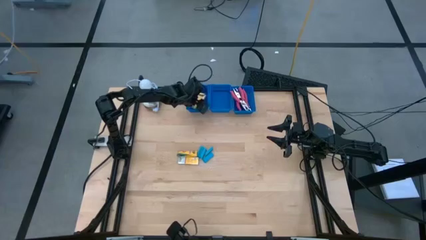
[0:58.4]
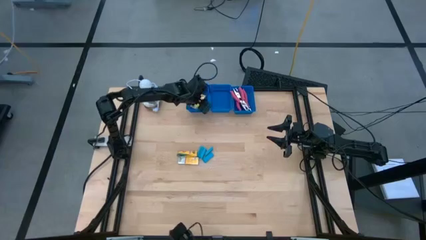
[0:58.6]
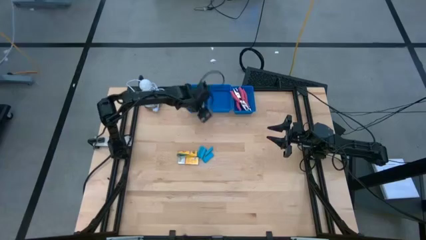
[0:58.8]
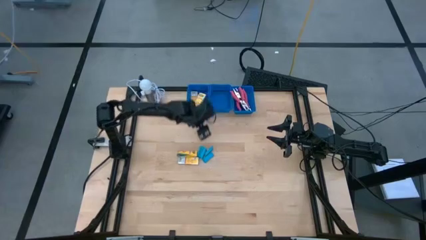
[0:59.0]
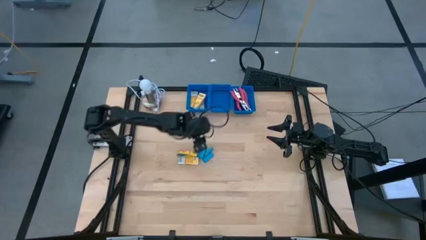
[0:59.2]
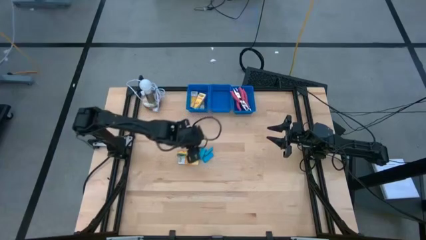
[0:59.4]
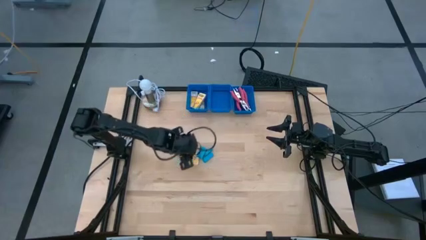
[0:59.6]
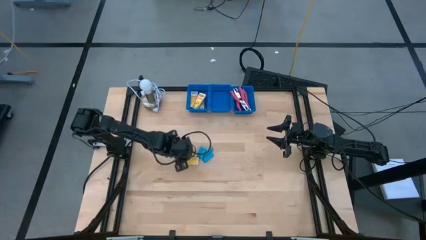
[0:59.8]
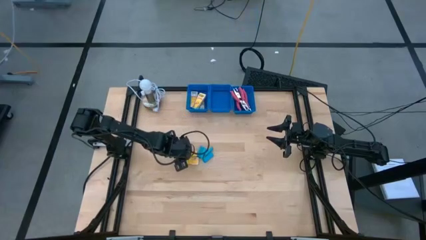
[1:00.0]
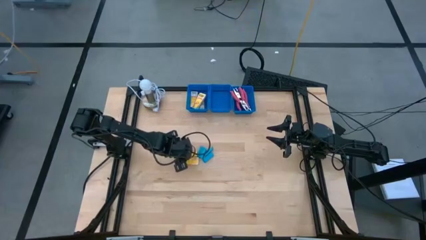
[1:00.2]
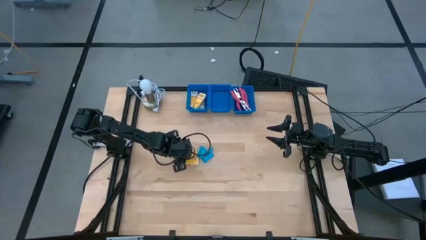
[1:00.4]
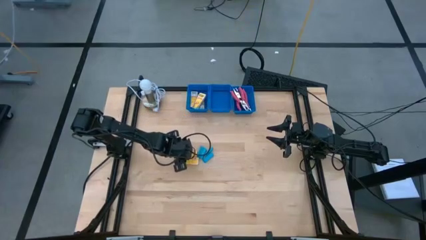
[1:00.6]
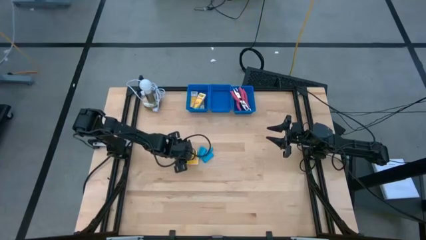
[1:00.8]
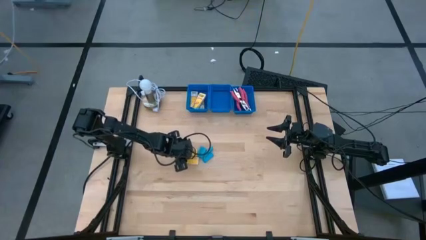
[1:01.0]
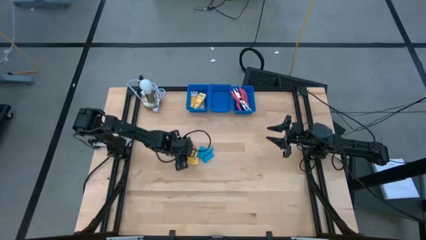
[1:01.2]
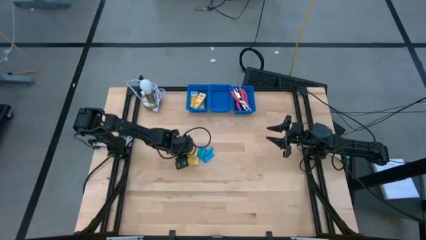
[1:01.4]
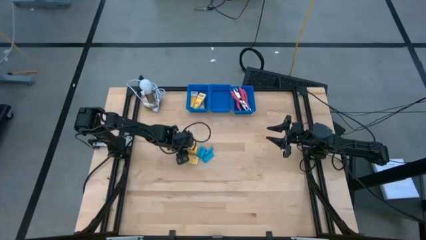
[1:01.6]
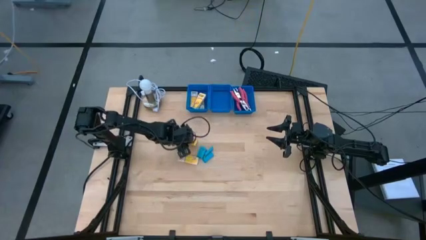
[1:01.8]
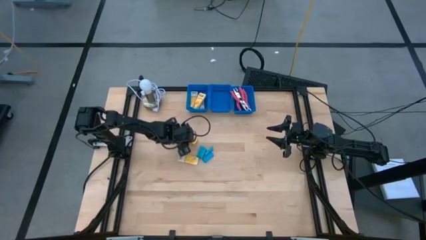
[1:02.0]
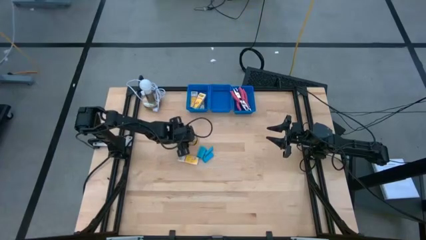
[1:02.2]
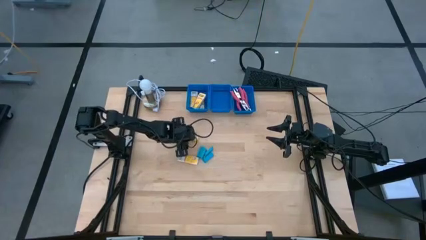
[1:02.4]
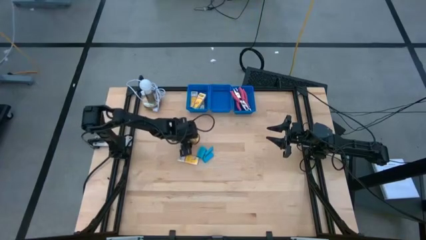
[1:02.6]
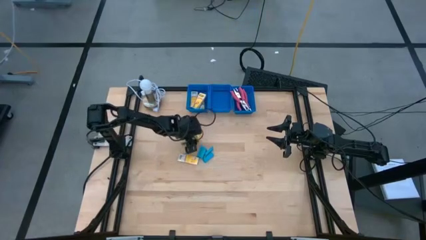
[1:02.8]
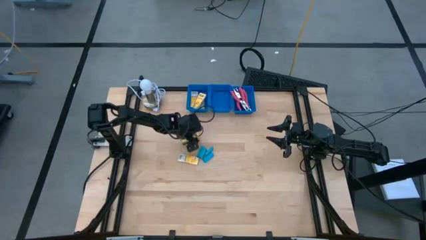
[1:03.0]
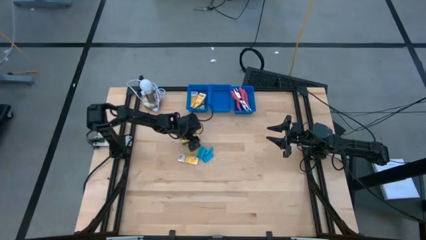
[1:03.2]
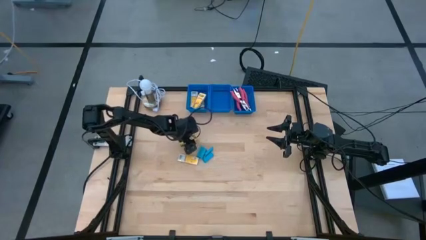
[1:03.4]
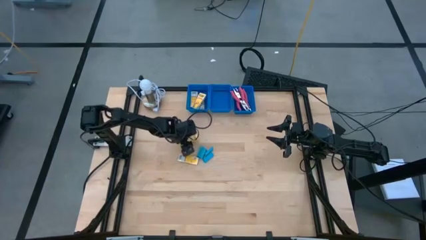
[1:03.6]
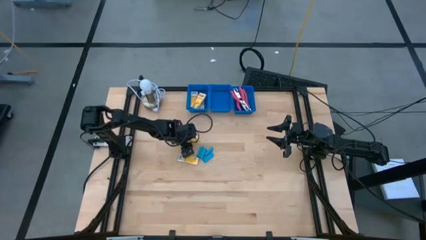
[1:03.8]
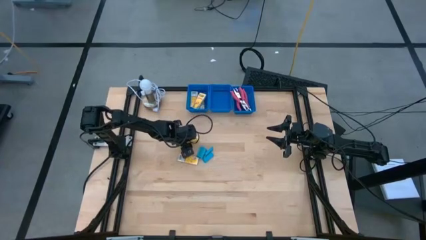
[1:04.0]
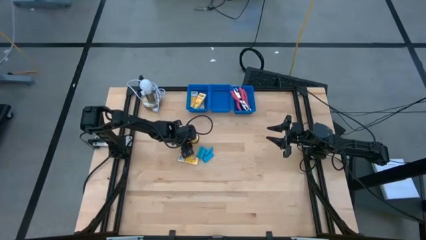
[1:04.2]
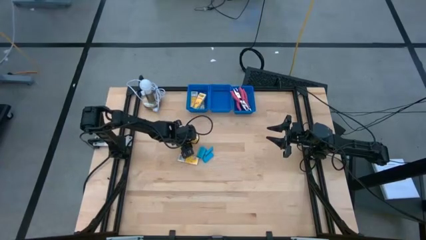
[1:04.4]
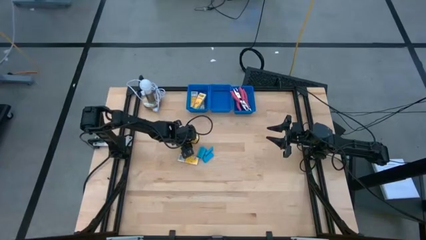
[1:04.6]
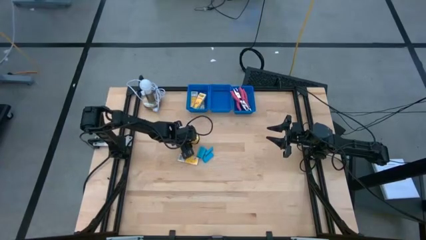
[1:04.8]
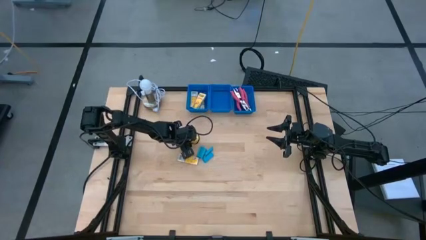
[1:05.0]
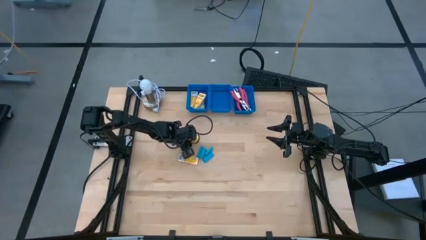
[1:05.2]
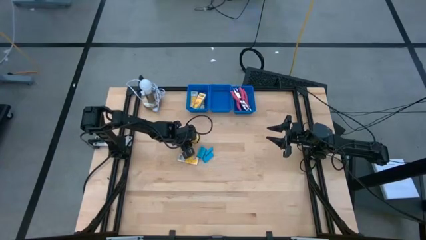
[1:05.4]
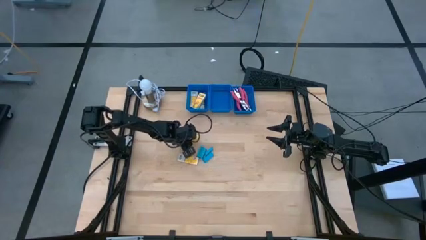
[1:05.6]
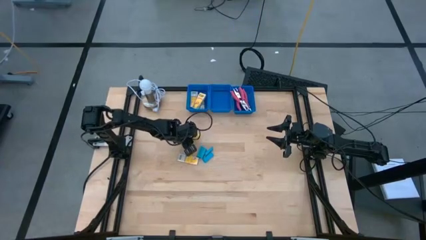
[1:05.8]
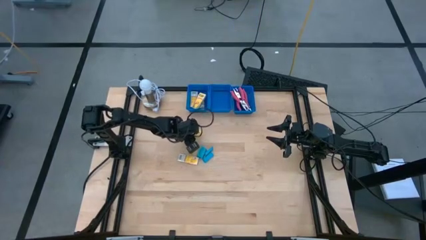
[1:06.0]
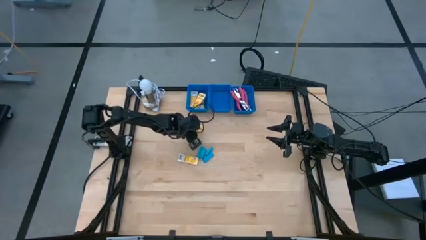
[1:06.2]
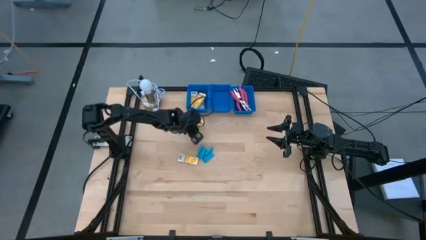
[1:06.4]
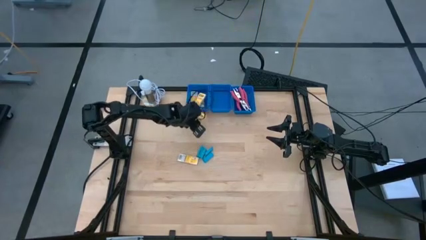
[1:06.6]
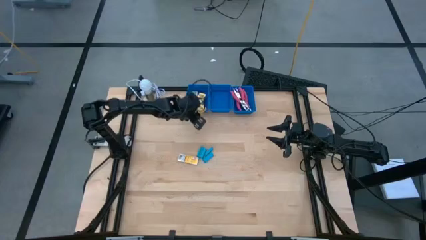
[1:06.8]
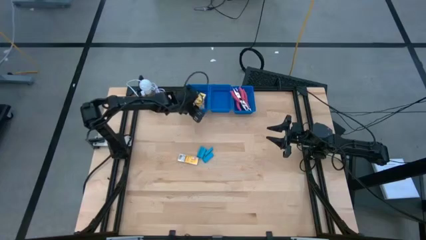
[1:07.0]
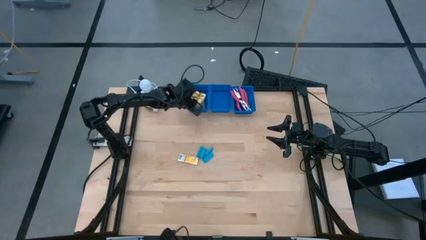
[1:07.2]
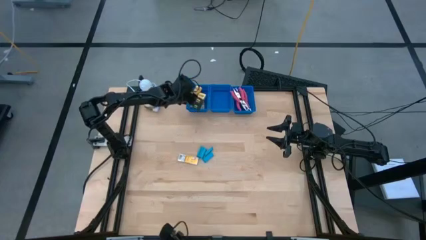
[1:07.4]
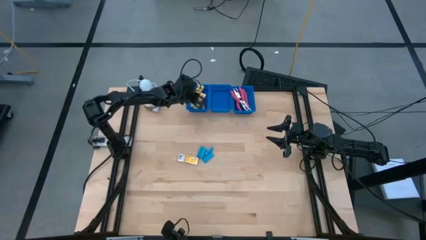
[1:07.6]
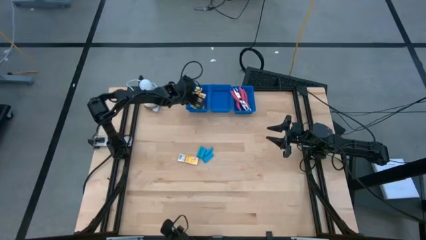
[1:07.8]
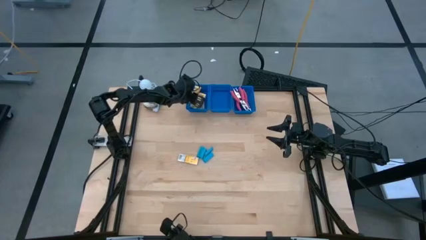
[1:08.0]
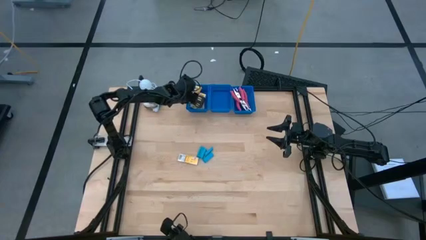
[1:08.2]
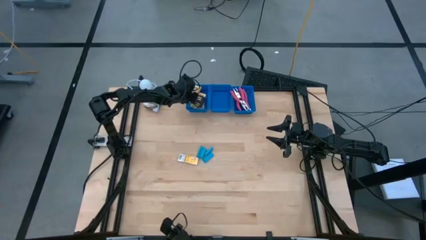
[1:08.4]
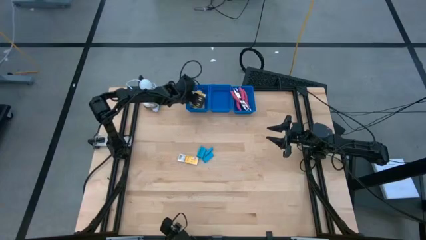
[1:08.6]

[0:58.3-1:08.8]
Task: Pick & Place School Supplies
Put the crayon box into the left blue bin

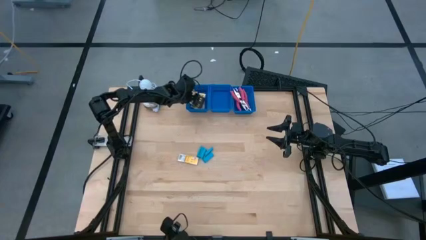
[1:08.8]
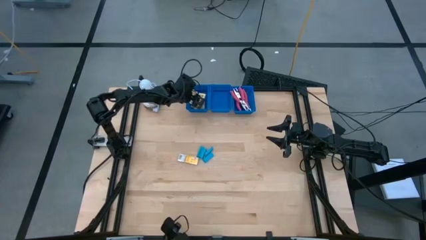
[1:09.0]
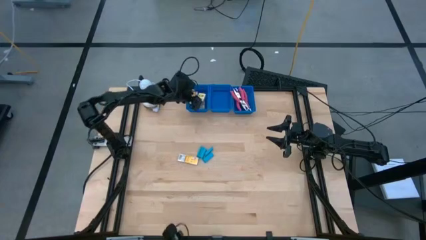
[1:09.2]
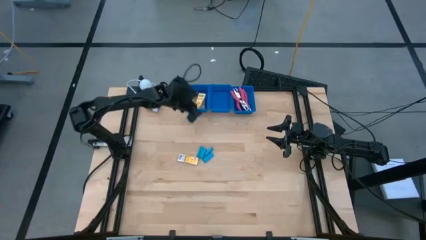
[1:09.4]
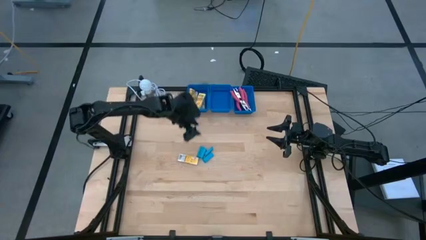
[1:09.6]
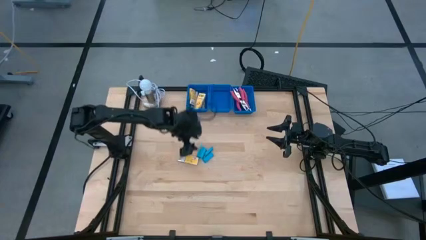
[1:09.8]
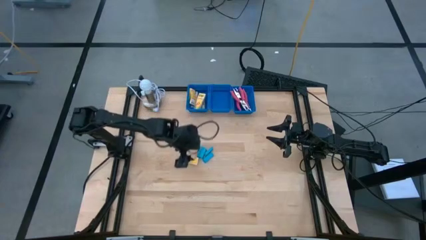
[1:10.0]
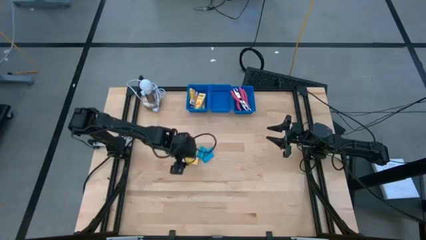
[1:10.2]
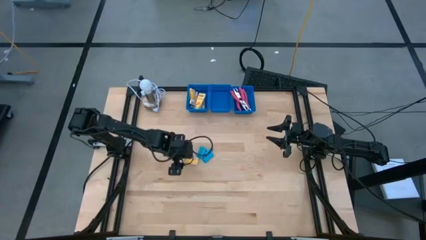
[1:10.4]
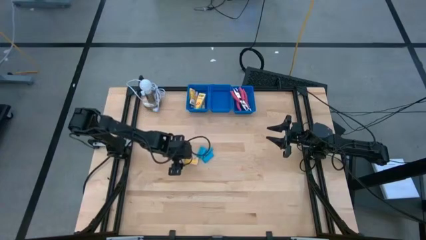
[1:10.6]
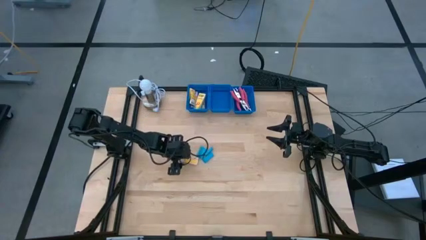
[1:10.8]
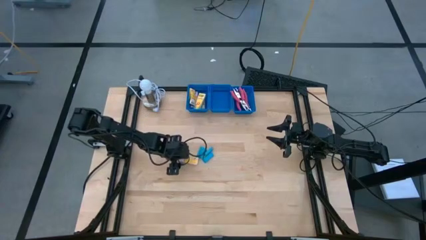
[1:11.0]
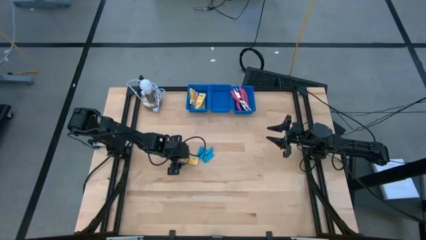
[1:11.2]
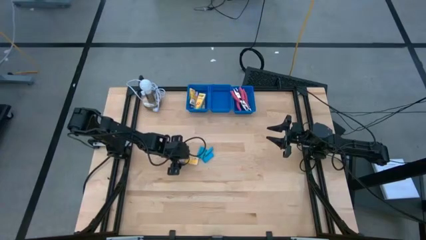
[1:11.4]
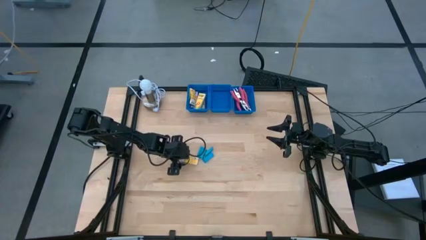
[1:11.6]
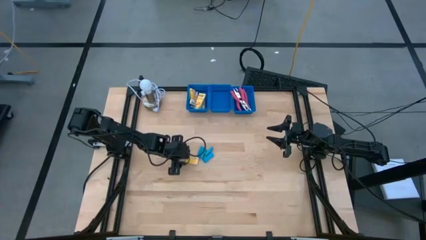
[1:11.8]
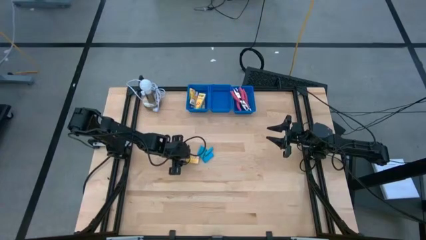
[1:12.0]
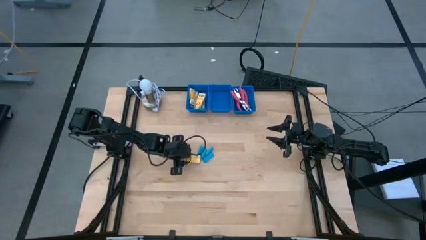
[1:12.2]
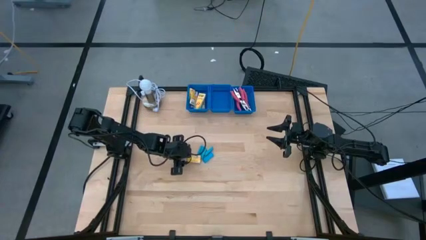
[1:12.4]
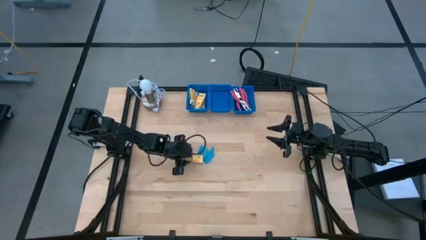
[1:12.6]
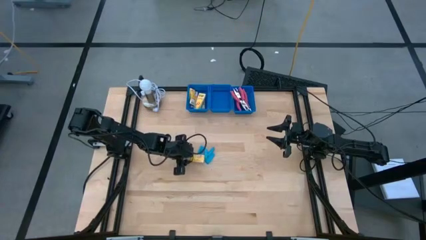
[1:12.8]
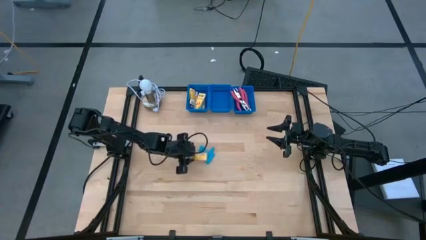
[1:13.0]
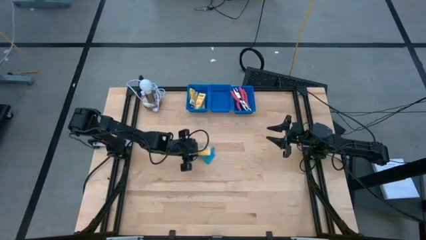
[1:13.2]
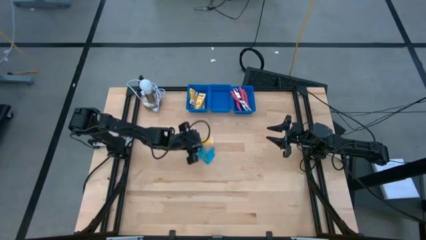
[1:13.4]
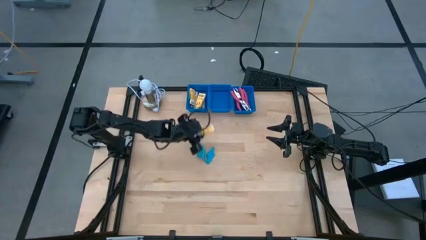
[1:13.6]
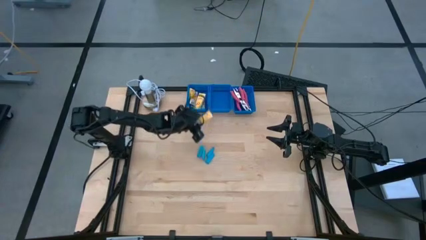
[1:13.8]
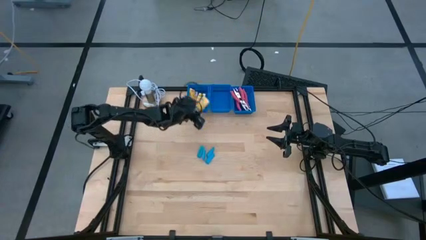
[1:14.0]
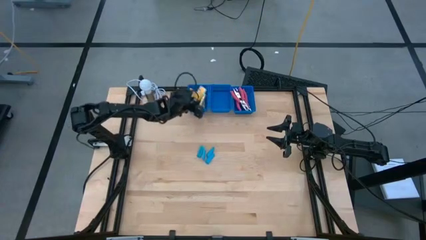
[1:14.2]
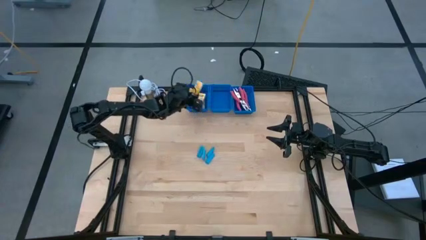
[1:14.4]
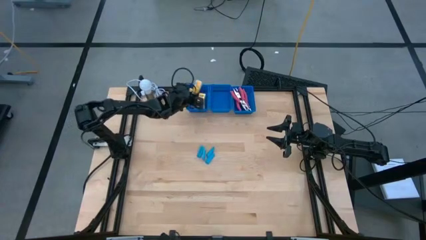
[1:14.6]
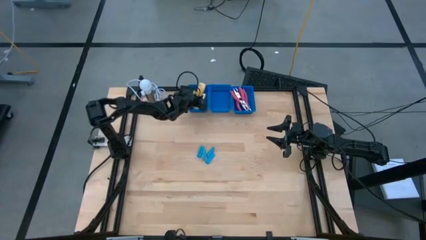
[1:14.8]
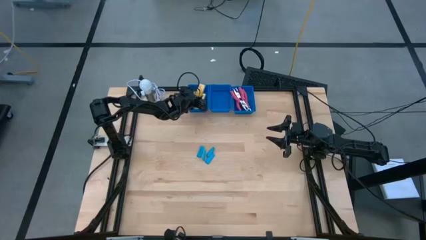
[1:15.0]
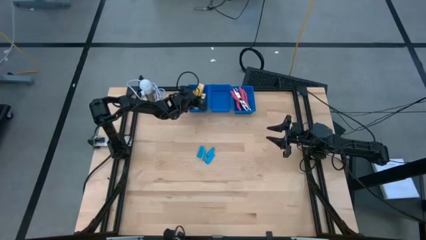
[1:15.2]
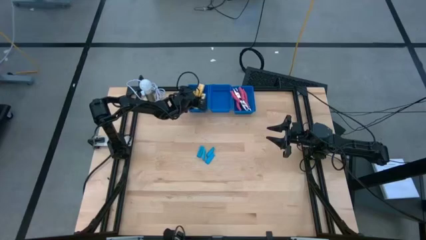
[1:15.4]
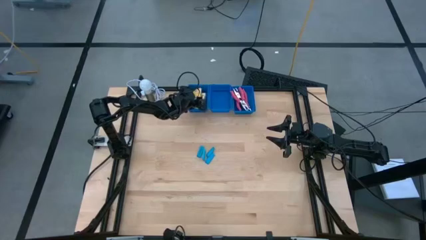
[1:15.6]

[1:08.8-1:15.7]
Put the crayon box into the left blue bin
